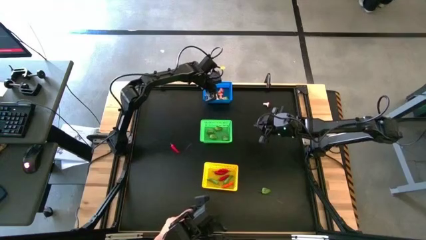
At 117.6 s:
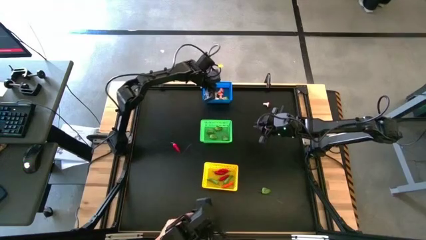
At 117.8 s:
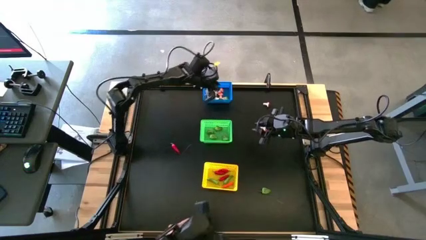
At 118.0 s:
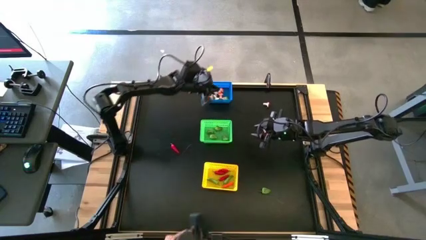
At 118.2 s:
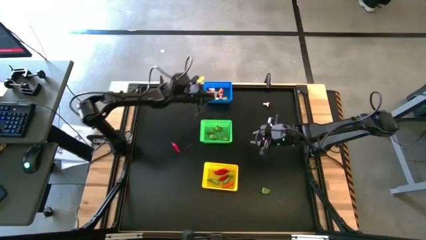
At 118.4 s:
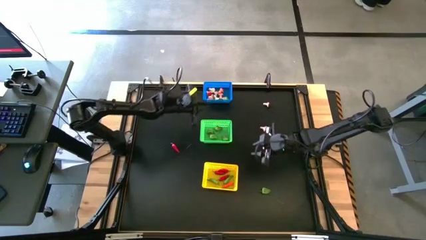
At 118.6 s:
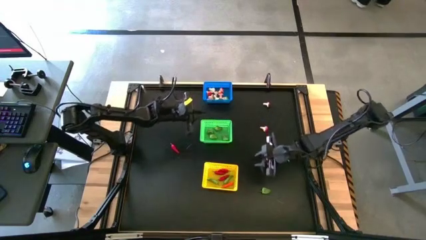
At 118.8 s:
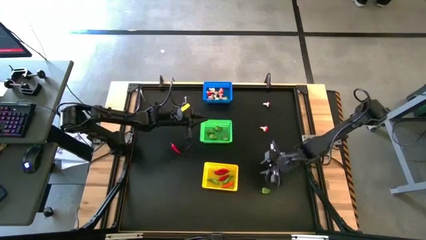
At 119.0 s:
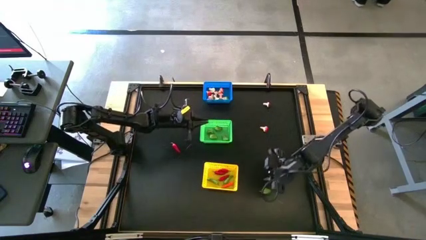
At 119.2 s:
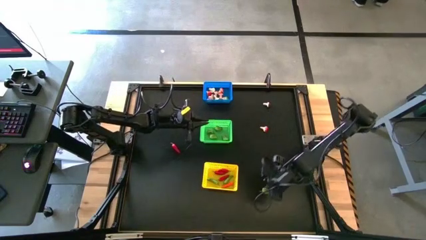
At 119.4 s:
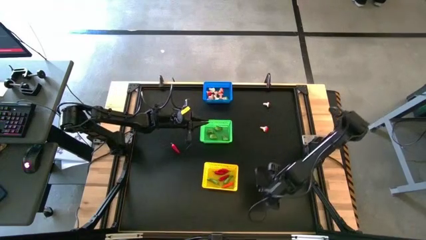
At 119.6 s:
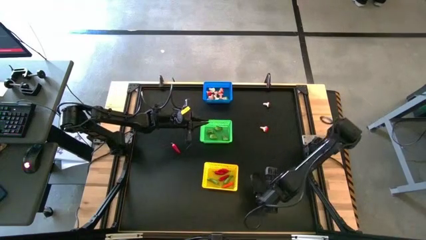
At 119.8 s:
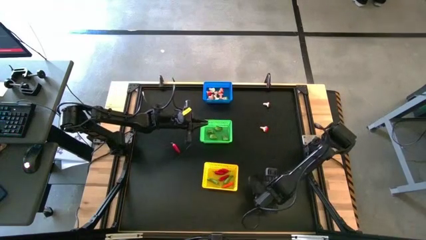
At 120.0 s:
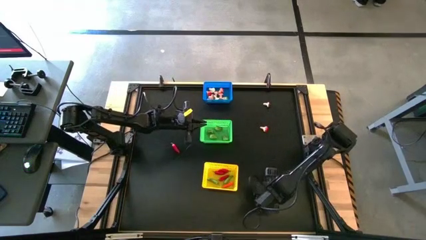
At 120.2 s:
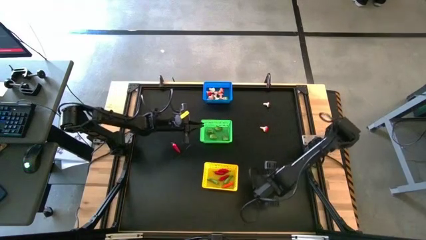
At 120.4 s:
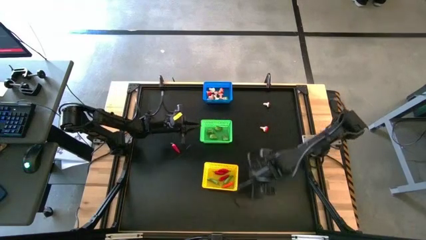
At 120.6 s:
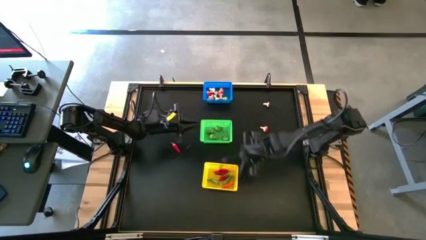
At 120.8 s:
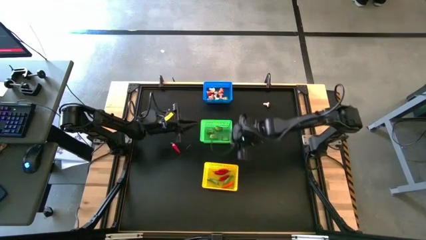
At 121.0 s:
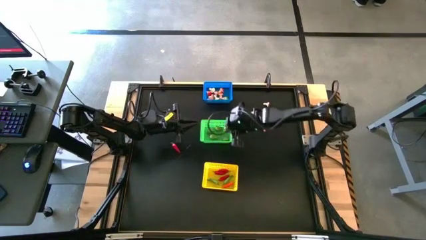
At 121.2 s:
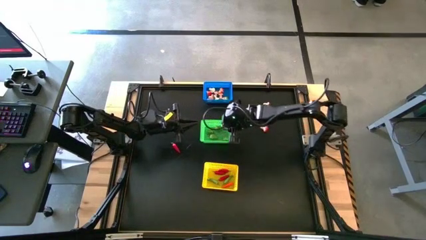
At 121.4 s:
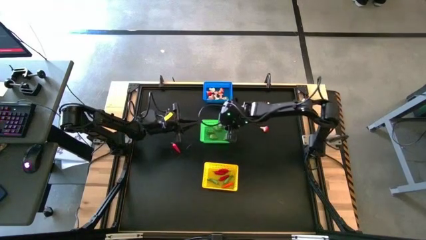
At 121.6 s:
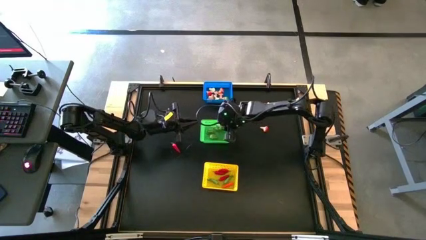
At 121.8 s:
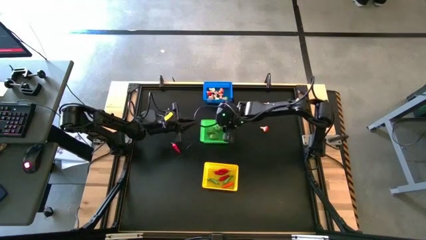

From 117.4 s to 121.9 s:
Task: Sort produce into baskets
Put the green chili pepper into the blue bin

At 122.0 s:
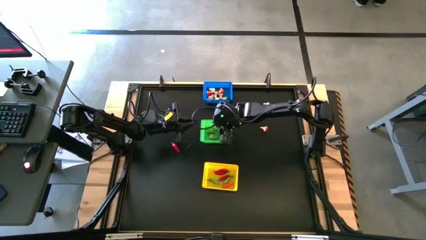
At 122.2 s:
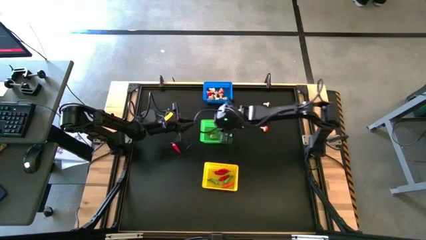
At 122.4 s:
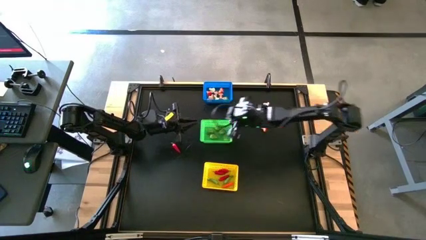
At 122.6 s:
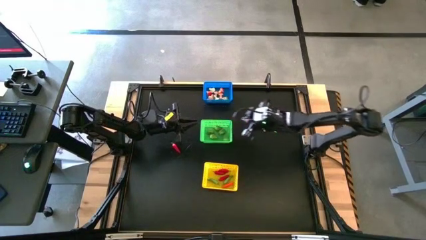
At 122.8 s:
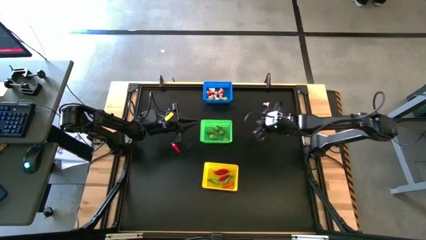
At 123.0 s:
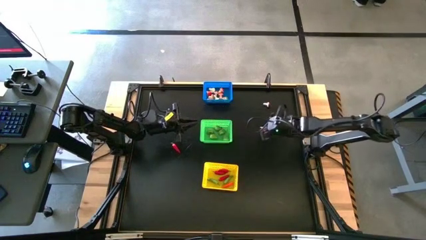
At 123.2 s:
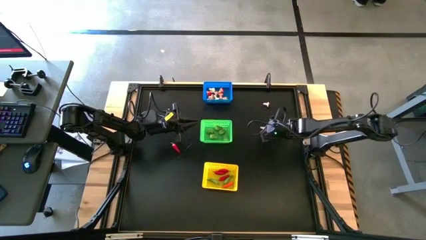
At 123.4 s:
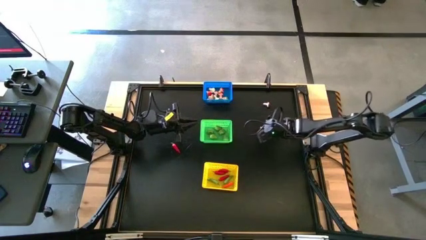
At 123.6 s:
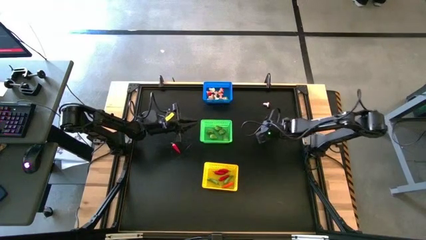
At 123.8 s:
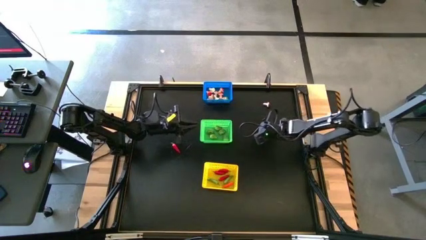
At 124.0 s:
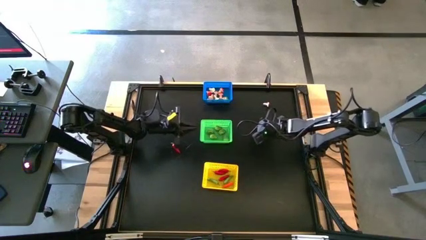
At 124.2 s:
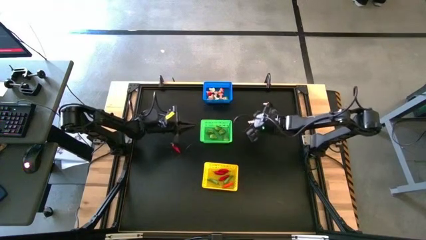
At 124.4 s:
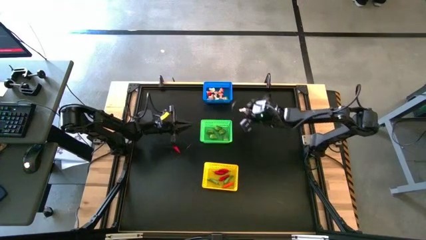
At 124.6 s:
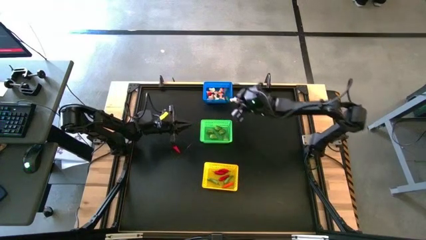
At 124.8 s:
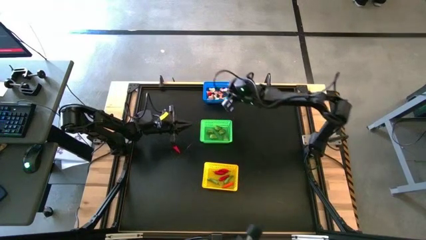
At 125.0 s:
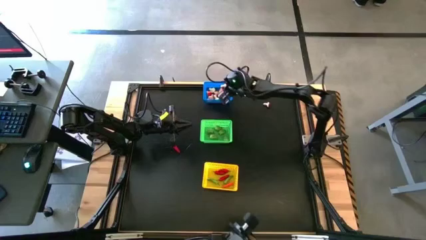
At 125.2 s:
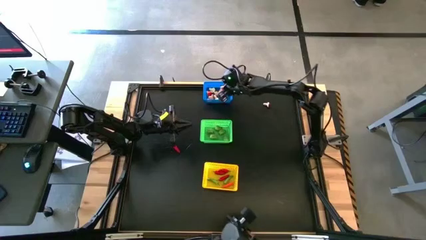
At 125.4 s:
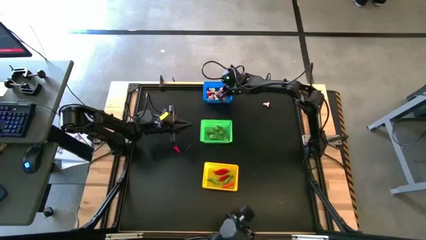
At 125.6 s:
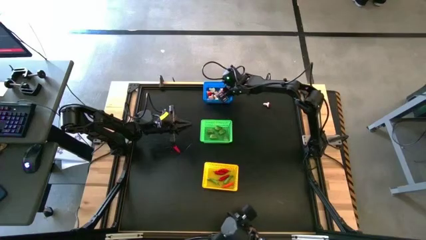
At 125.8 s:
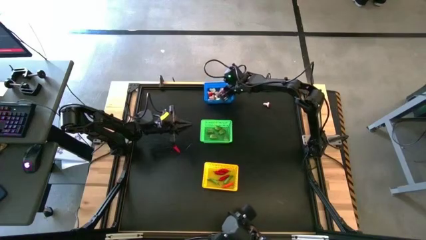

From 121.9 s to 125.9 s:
Put the red mushroom into the blue bin

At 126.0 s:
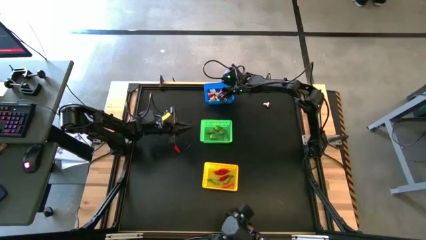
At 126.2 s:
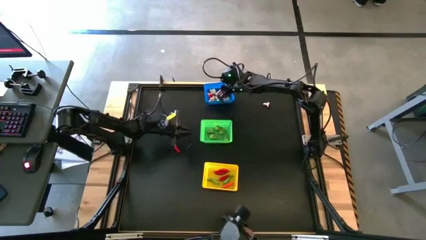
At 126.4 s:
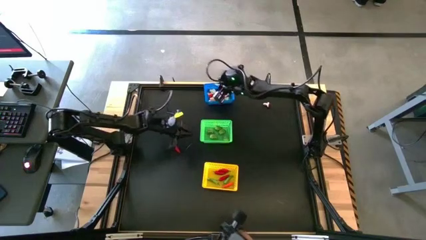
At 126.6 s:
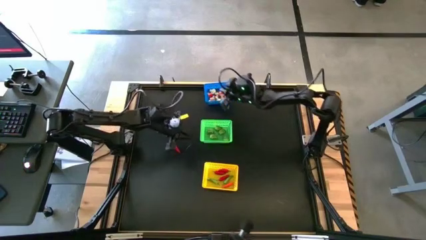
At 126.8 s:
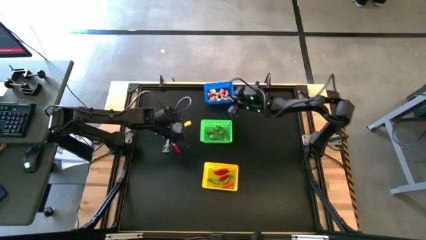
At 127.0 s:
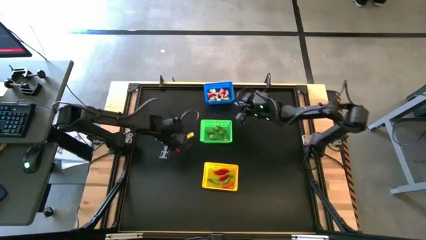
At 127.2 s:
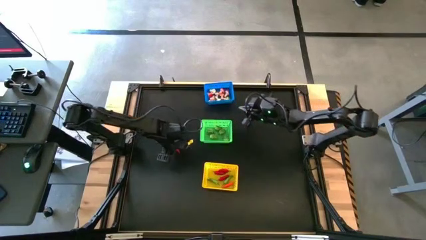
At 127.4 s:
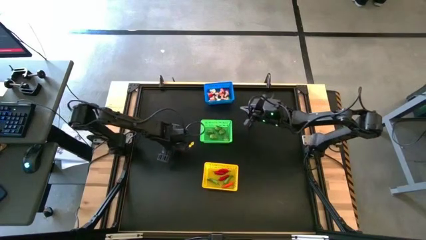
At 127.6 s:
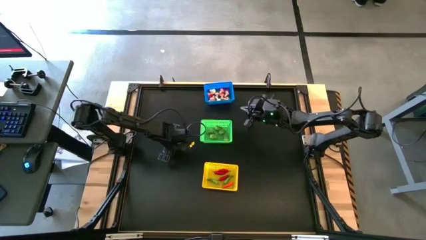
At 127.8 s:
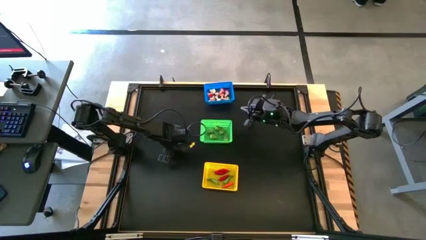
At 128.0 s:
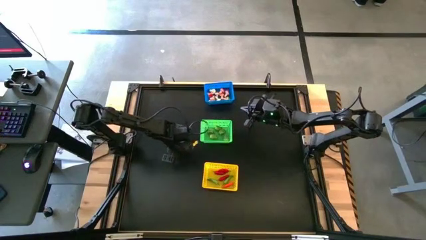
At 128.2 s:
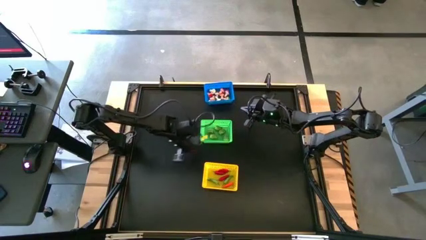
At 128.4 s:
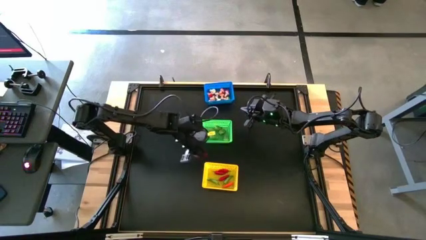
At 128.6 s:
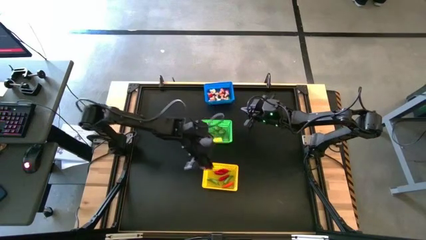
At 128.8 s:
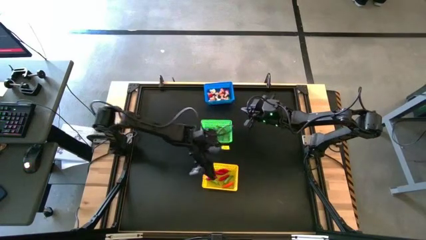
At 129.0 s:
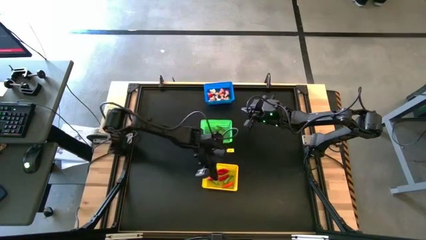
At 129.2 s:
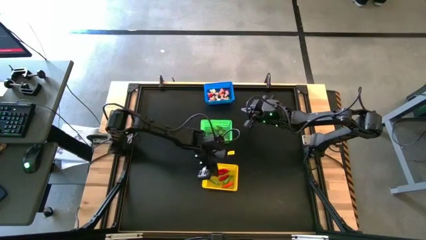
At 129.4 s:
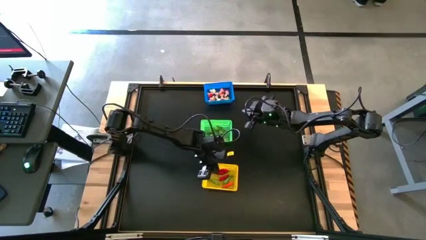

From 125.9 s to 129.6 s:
Put the red chili pepper into the yellow bin

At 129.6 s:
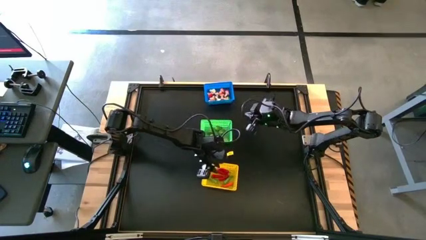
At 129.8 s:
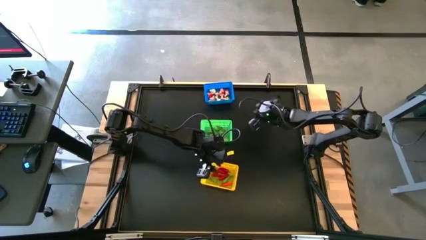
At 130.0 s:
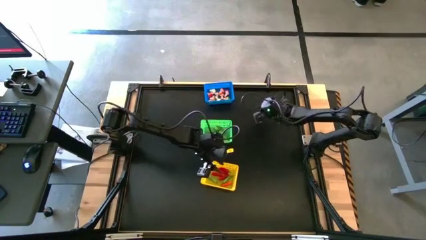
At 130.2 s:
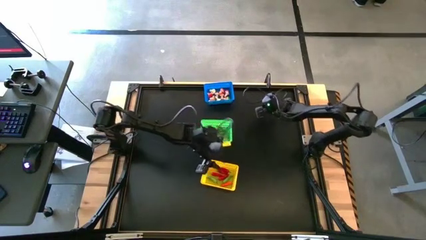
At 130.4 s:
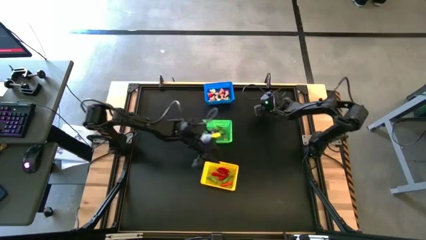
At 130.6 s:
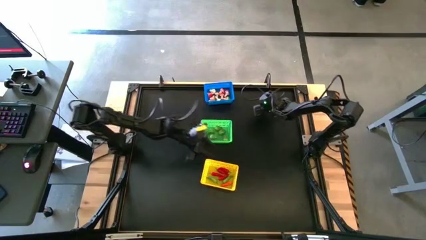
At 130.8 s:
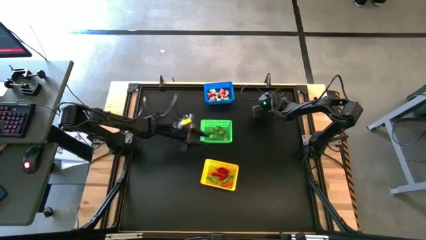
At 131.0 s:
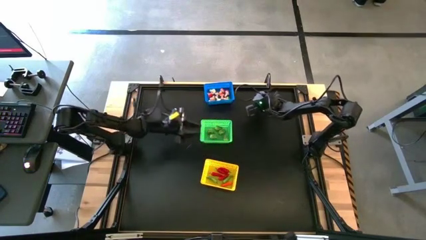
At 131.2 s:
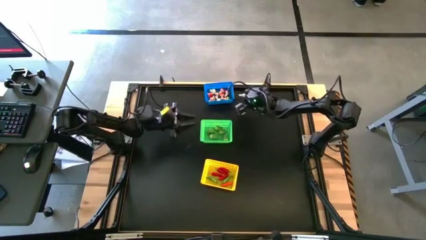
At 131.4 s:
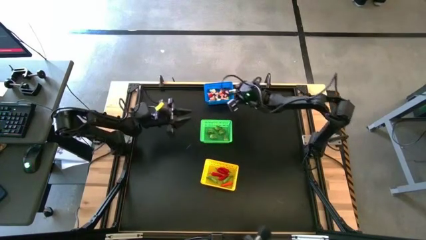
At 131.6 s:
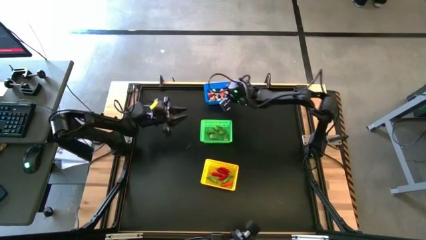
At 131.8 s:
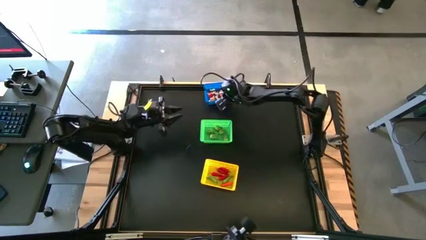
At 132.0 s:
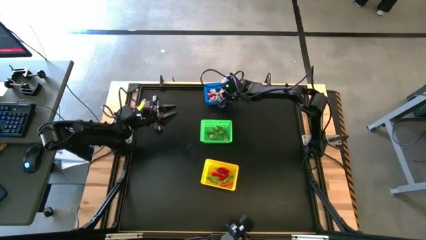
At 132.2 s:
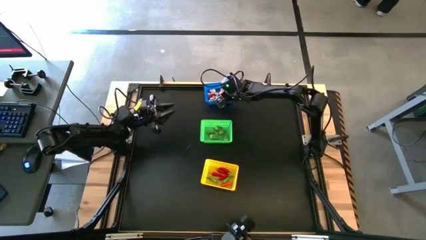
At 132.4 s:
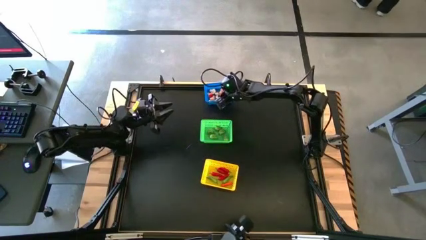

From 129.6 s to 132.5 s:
Put the brown mushroom into the blue bin

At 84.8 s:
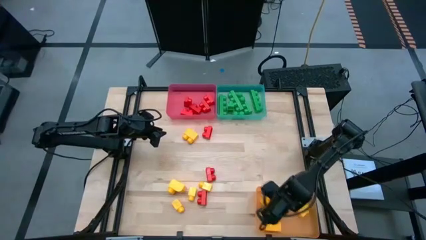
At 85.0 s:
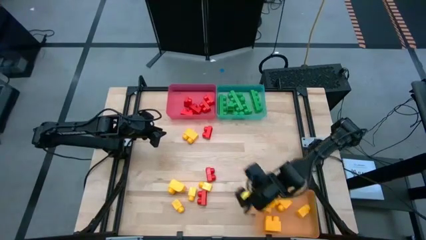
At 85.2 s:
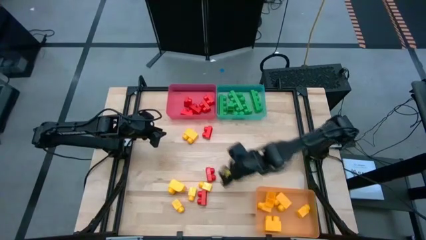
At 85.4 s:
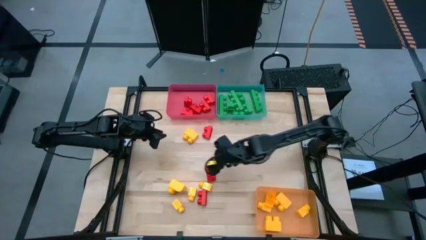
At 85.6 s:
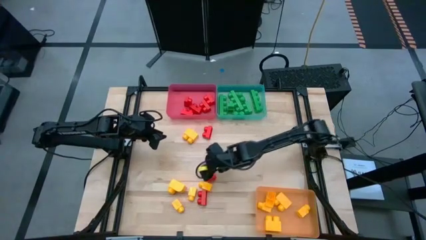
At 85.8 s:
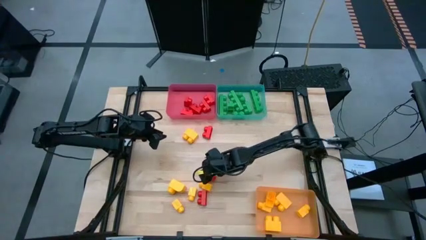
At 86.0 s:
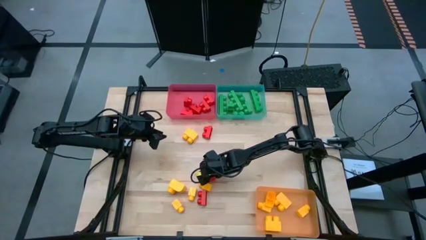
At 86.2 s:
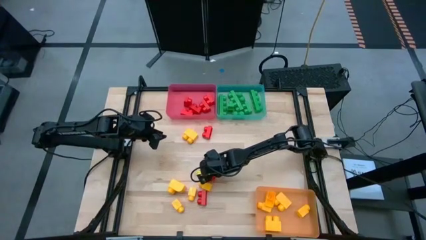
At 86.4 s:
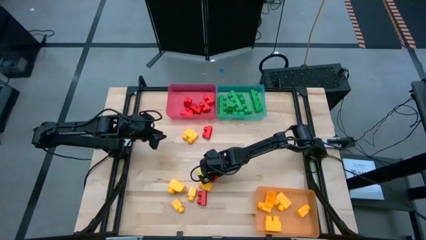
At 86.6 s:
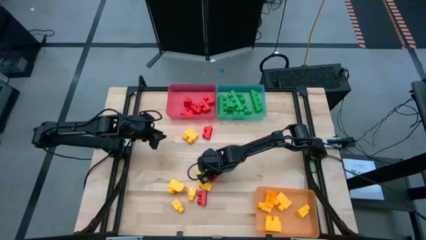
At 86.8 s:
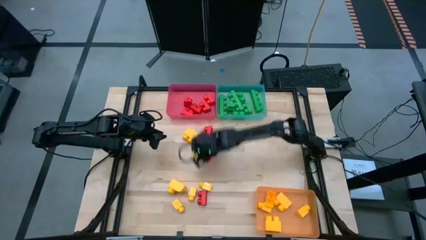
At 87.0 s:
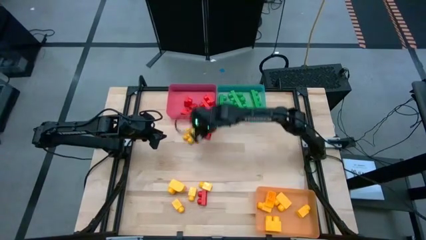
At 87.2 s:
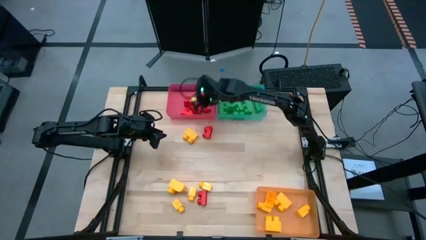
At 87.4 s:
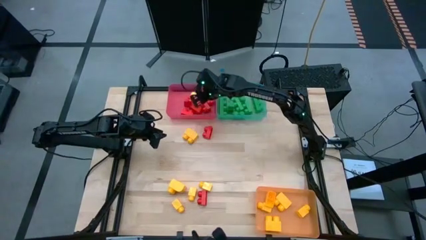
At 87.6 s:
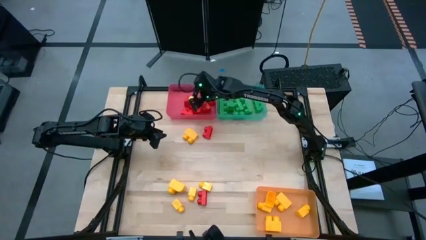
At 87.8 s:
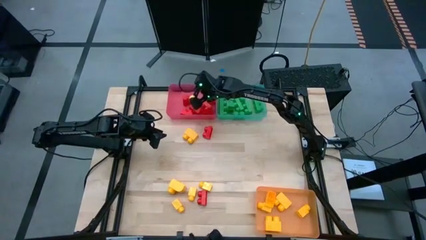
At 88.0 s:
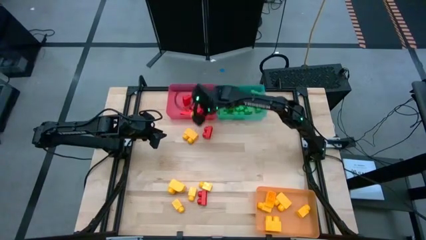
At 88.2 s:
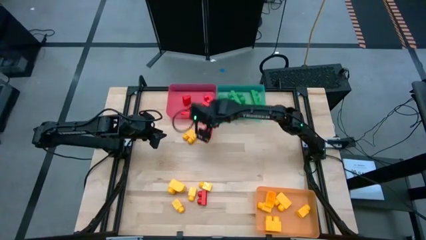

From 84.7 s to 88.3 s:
Task: Sort blocks
Put the red game piece into the red bin
